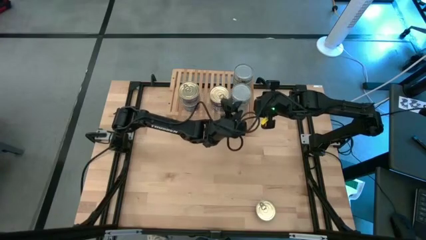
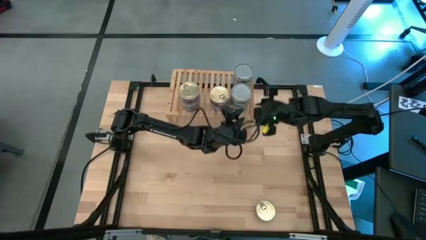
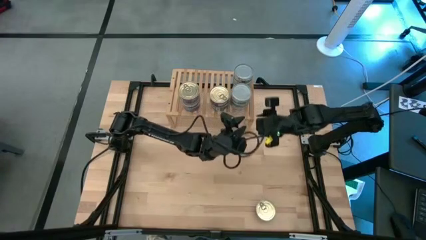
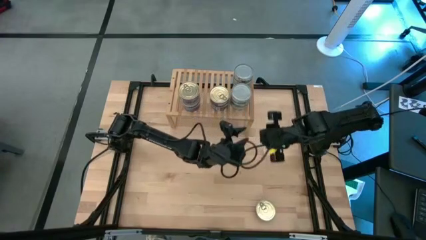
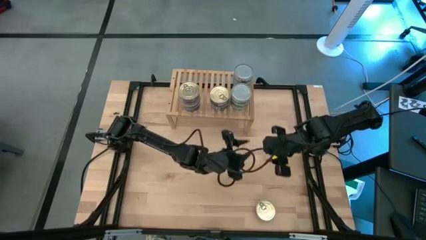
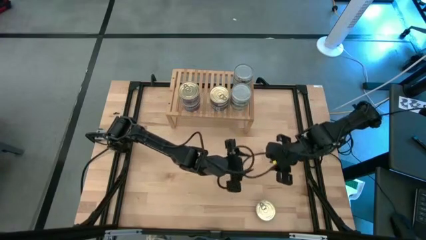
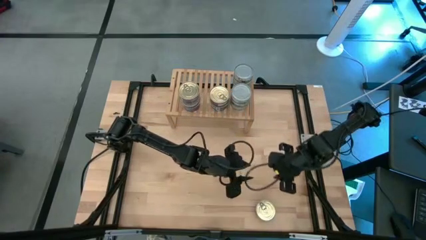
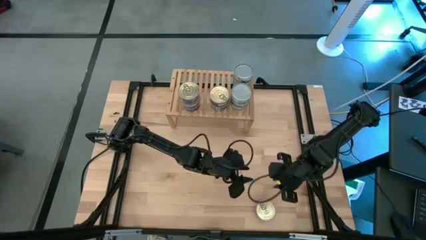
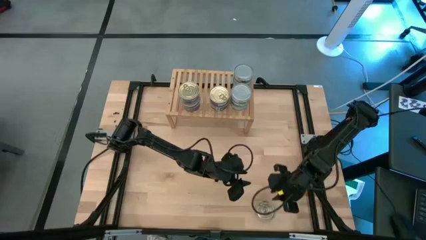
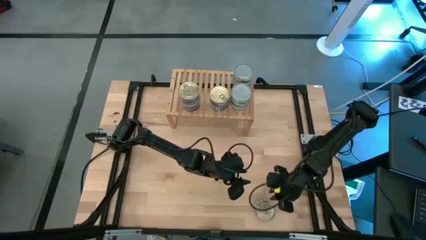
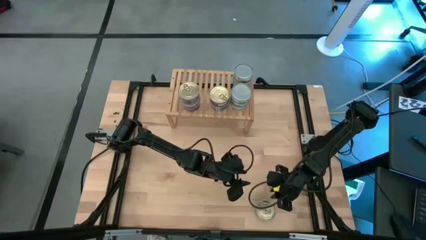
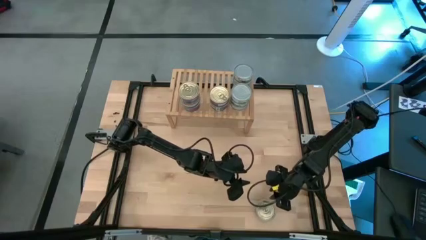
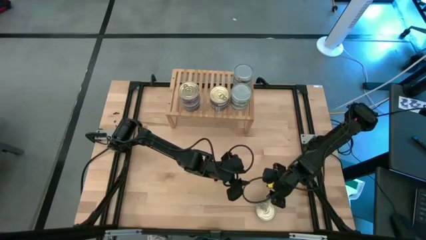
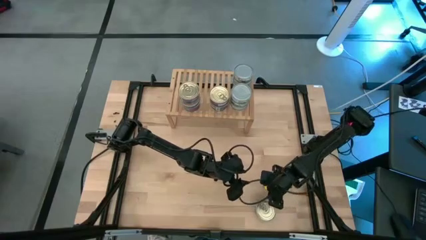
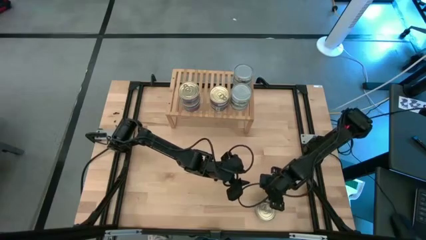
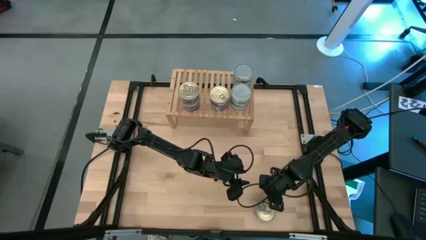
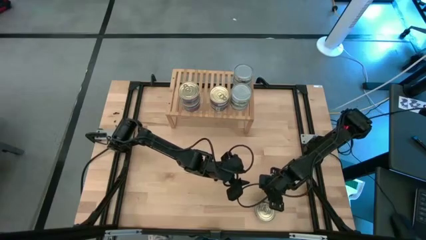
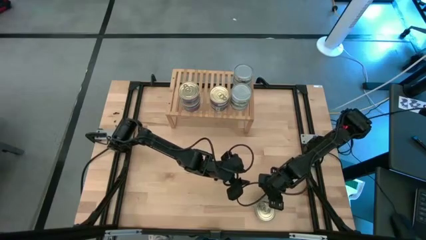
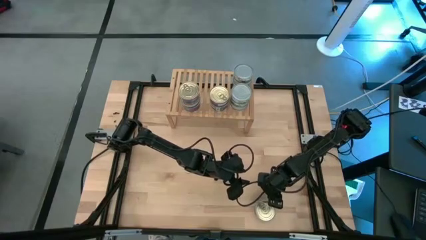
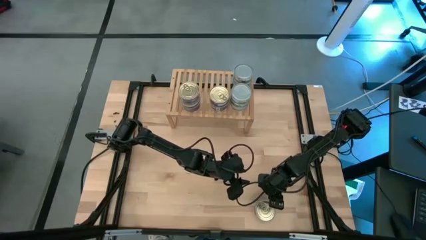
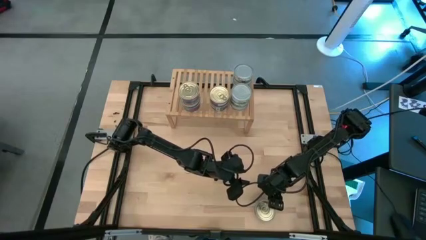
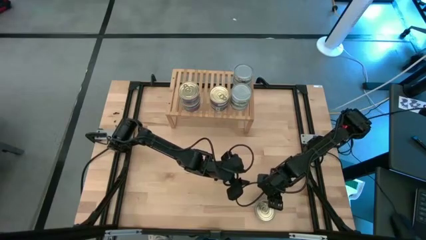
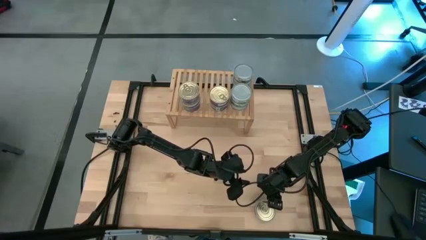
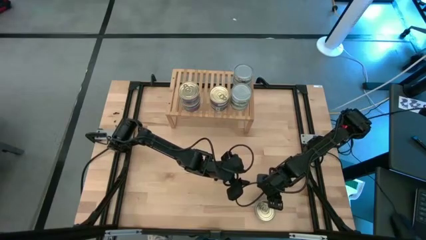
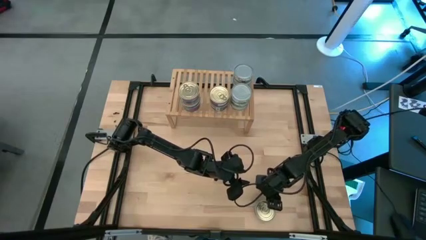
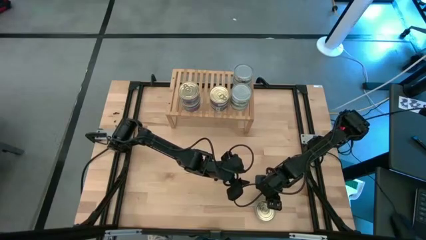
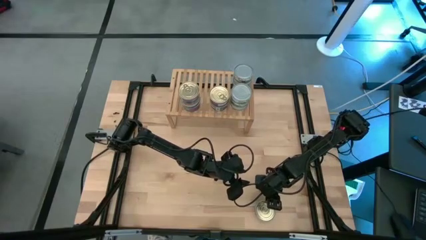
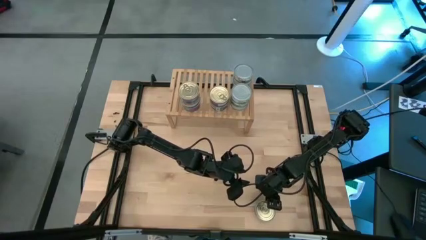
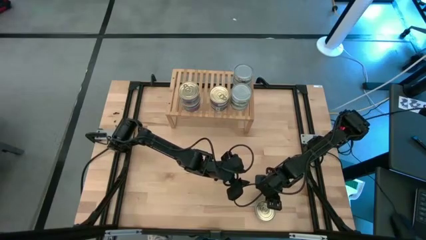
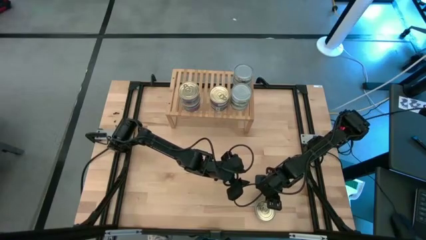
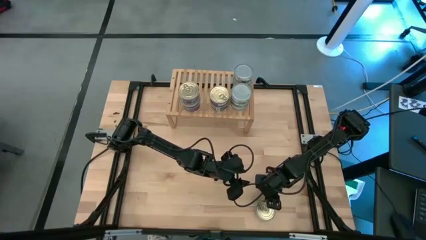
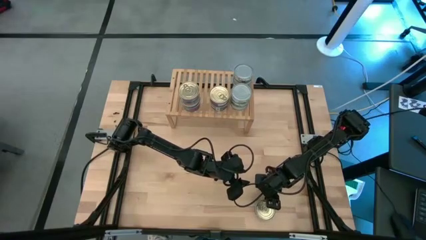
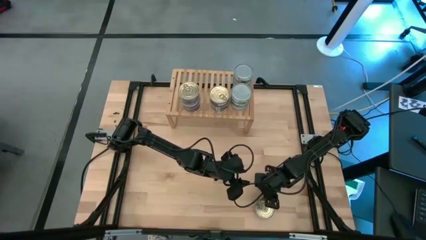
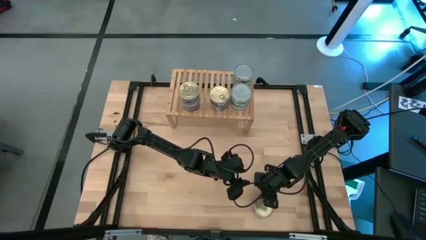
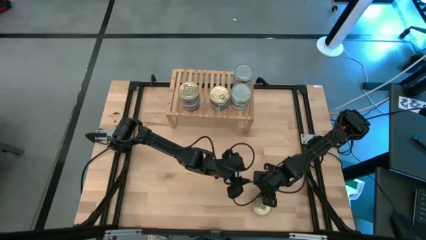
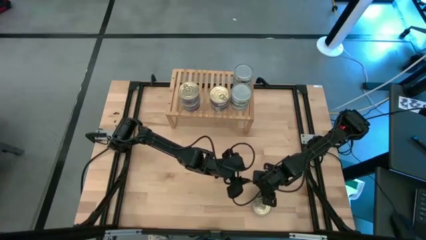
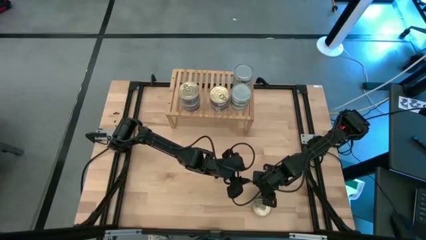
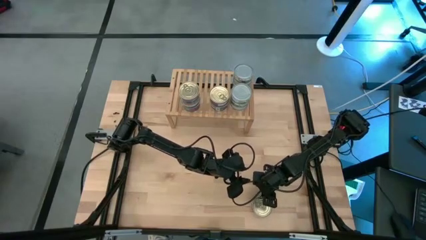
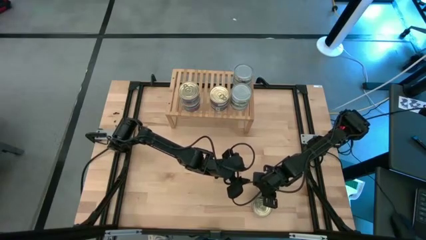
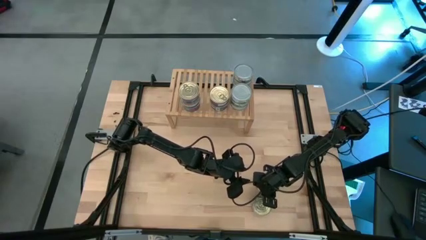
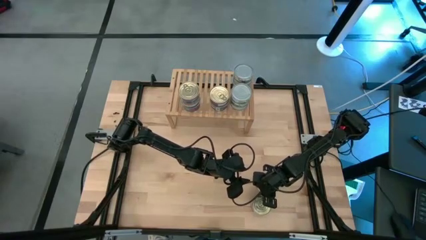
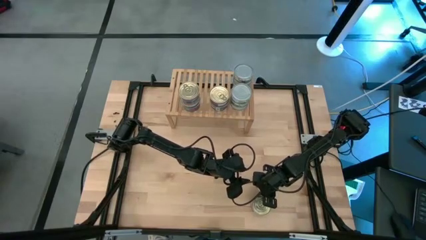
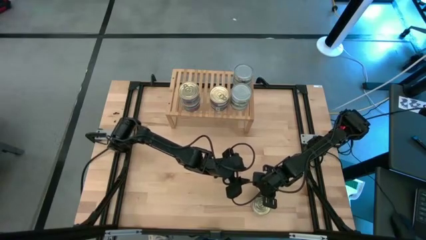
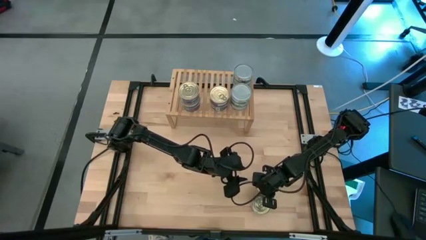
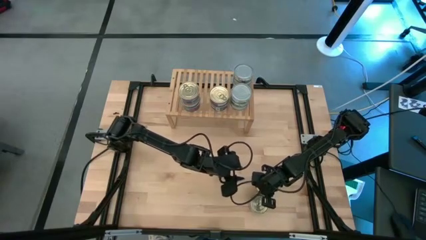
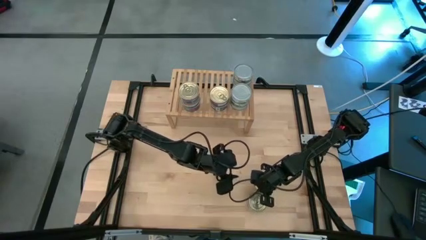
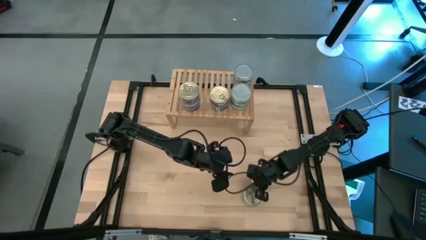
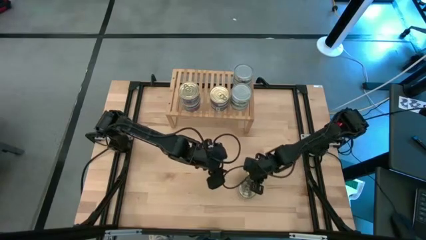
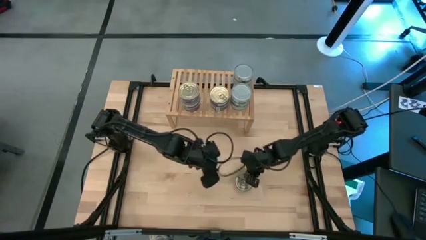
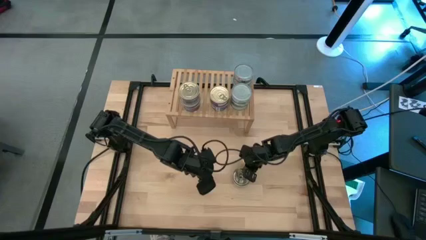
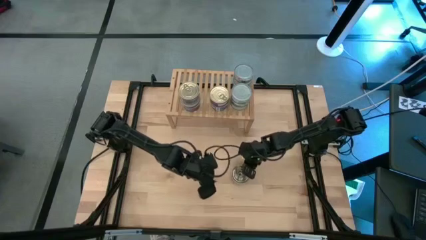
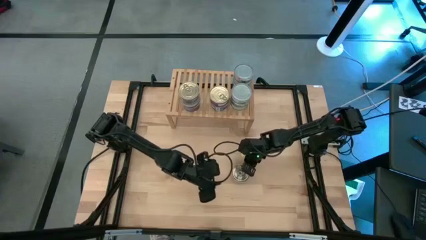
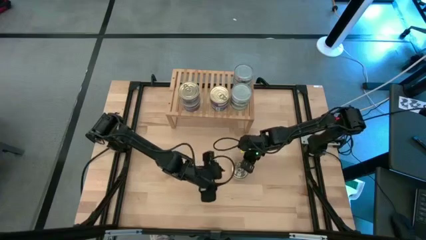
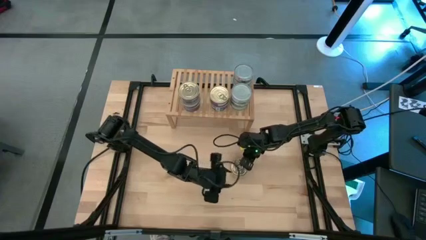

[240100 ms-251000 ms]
Task: Stack canned seafood by type on shelf
Stack the blue tuna can on top of the blue tuna cans on the shelf
